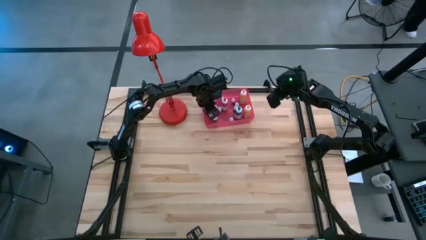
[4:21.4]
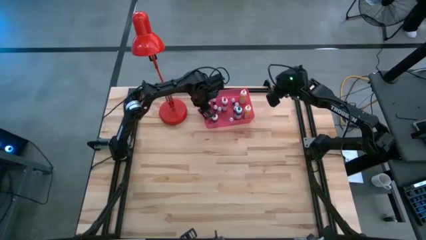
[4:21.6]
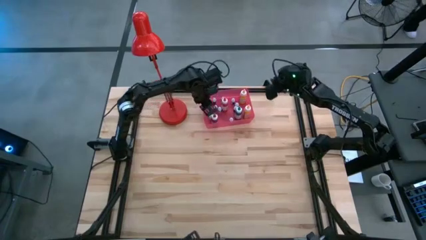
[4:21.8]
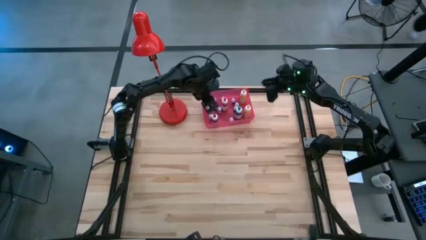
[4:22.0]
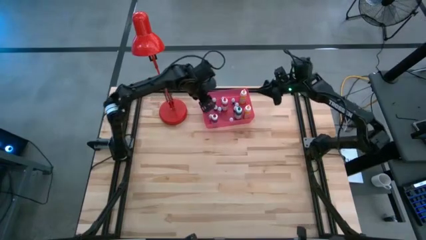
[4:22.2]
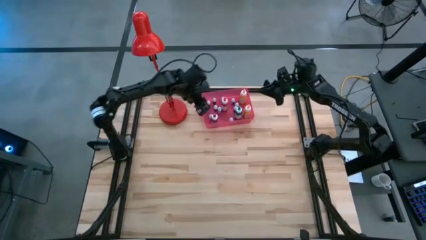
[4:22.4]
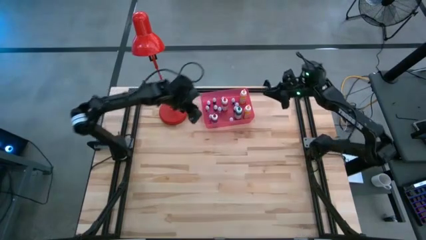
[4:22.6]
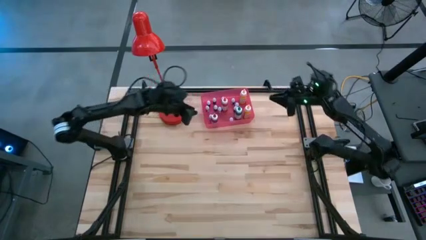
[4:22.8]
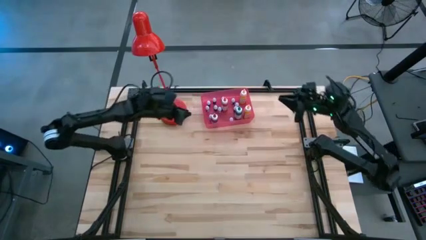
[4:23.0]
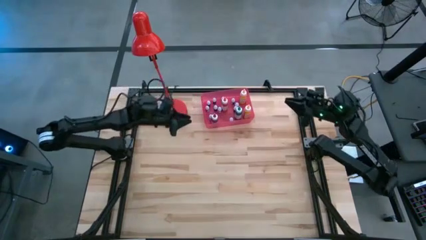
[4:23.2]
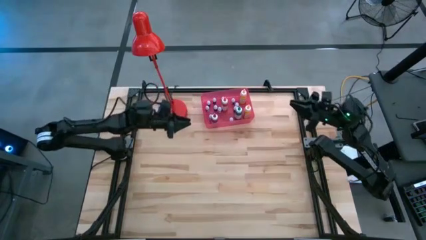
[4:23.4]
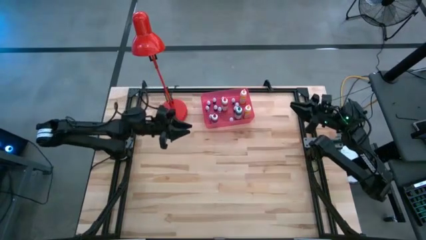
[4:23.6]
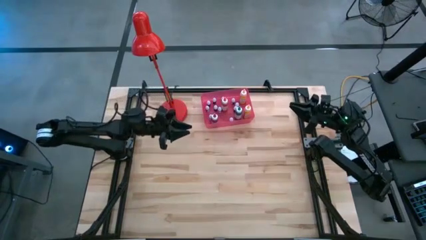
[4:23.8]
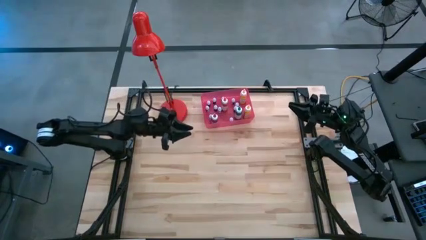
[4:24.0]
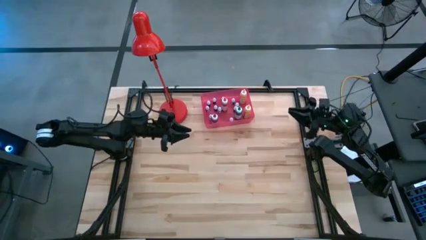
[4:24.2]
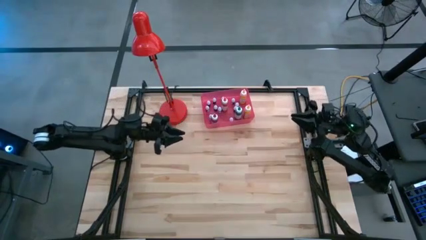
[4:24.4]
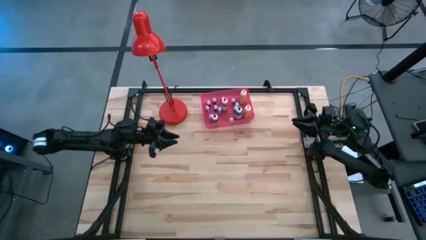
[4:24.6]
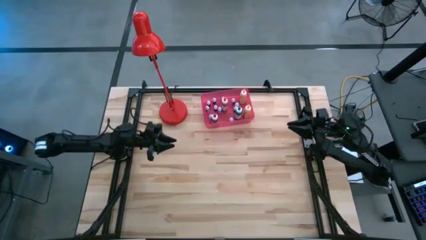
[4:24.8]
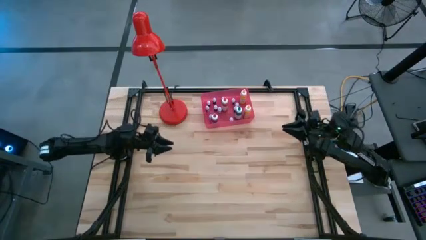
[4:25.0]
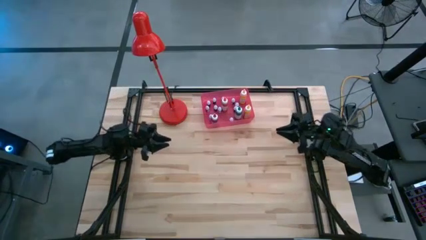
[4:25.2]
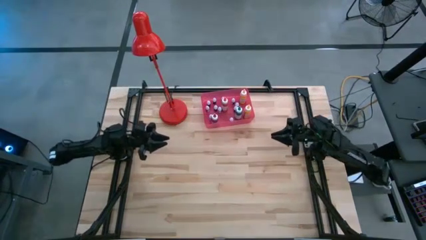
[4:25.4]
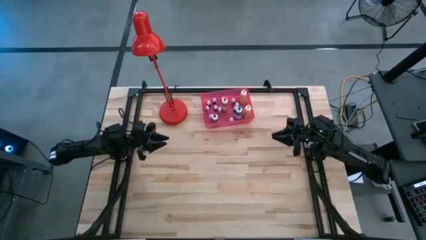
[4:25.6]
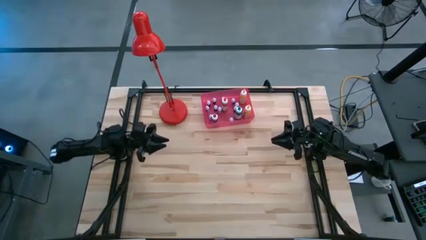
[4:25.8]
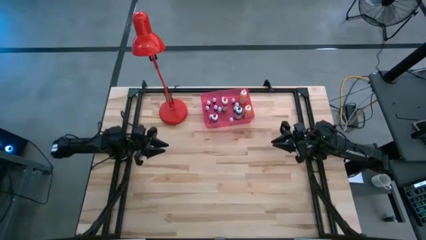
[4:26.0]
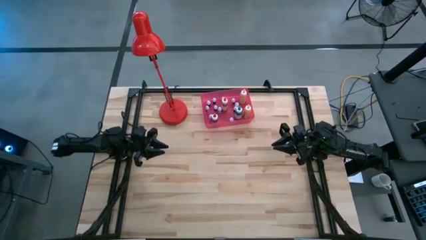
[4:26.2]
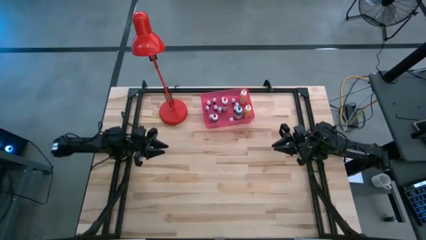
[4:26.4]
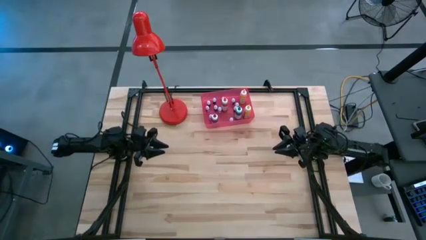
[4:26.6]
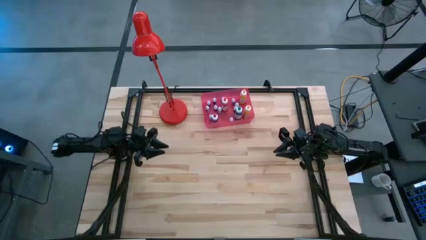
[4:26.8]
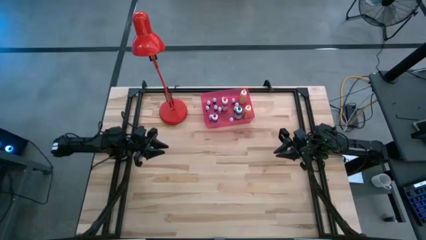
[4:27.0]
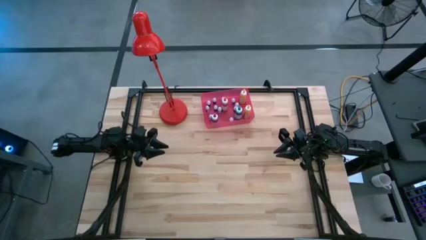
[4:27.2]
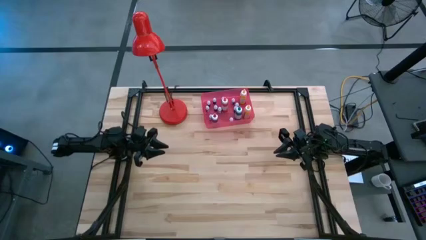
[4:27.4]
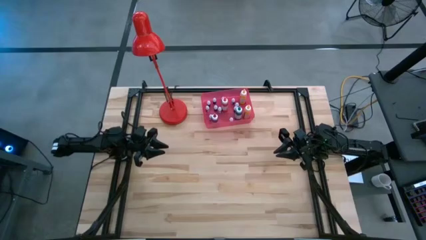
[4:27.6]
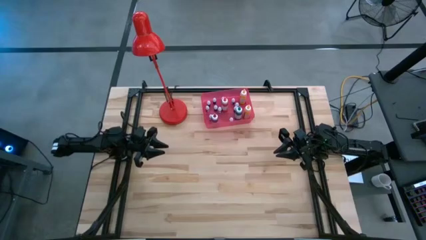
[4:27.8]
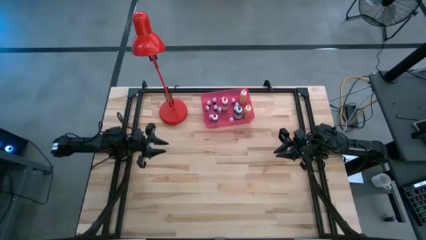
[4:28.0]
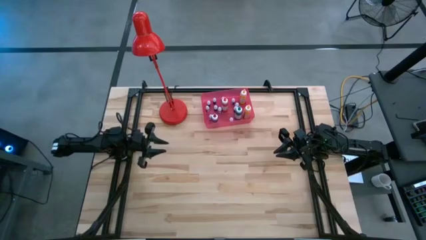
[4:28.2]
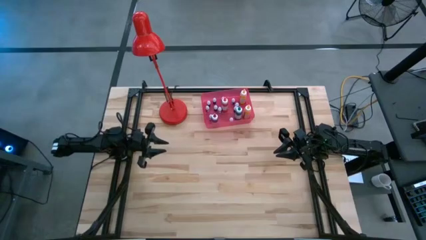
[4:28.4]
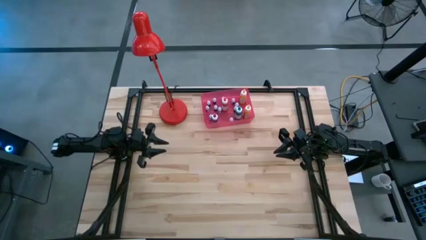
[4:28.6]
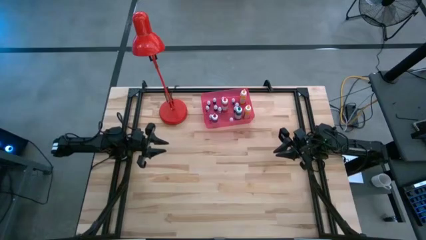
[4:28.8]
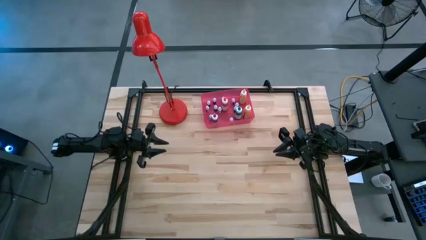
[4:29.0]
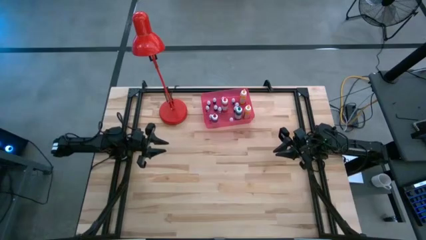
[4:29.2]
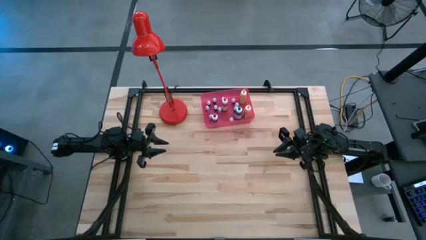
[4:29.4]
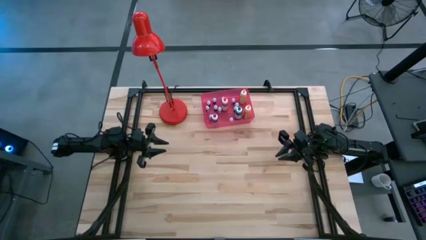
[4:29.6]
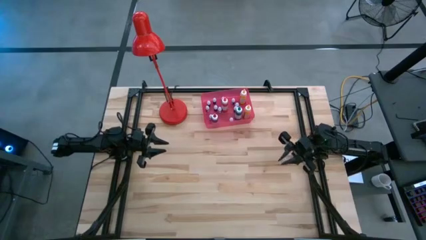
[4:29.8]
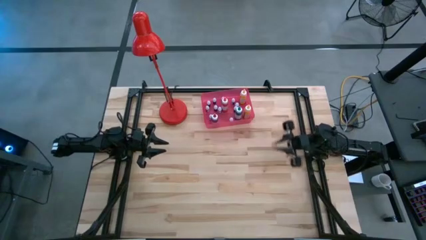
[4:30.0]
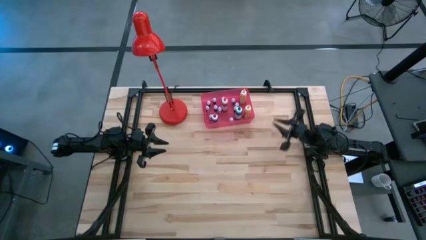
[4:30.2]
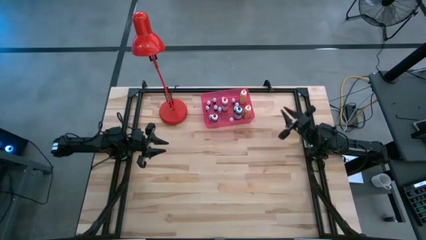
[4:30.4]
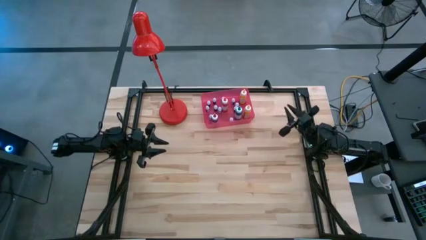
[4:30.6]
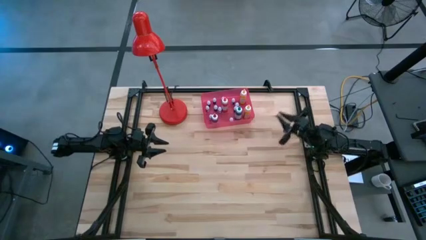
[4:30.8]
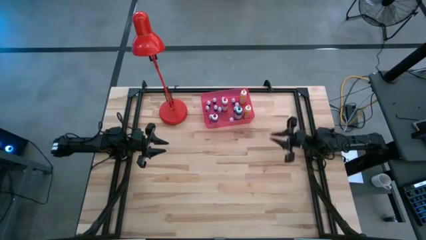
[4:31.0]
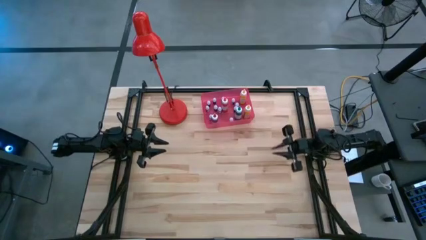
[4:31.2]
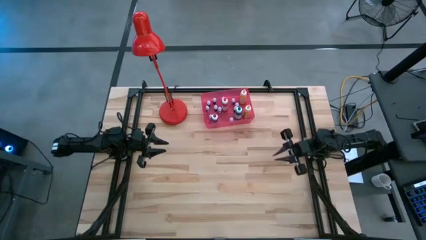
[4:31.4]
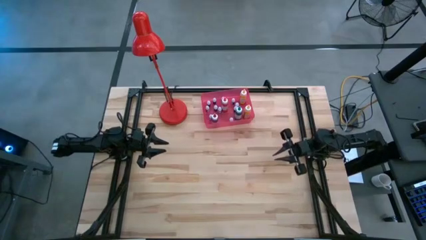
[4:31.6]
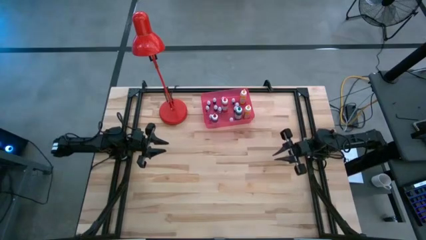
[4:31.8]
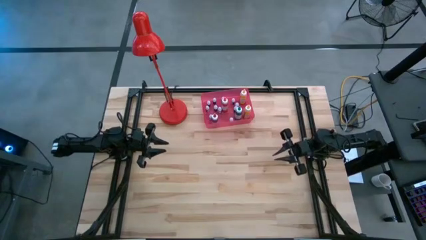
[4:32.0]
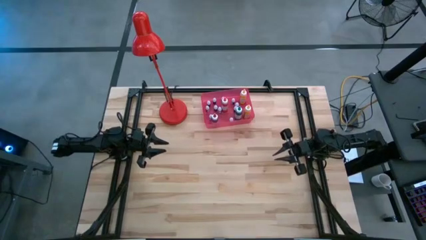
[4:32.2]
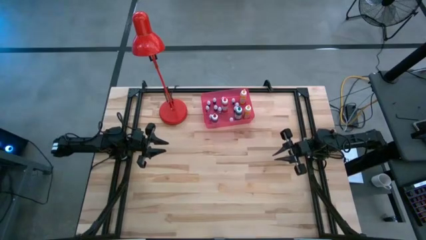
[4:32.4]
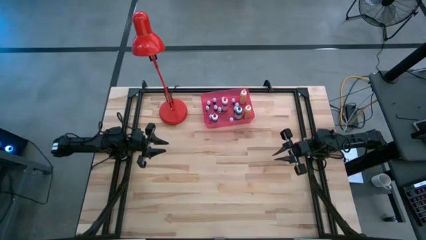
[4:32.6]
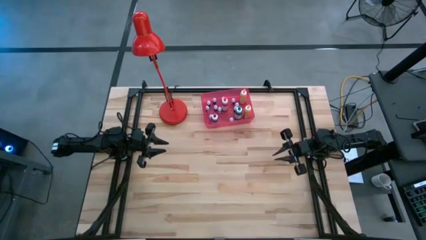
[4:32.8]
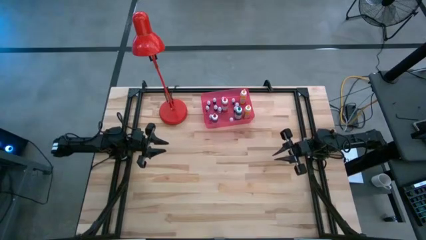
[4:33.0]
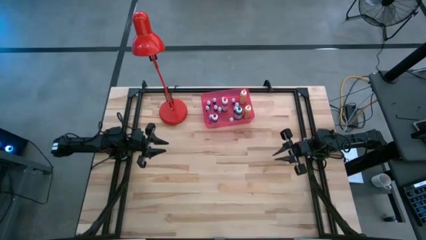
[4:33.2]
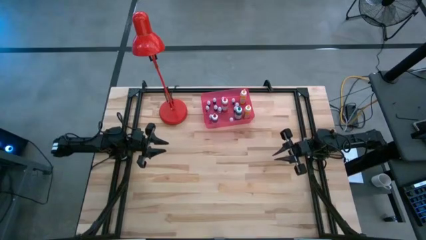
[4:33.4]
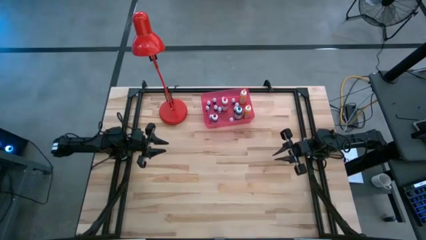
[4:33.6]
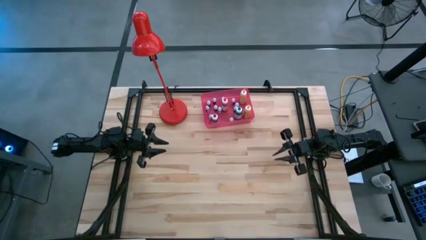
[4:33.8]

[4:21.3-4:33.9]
Task: Pick & Place food coloring
Return to Home Position

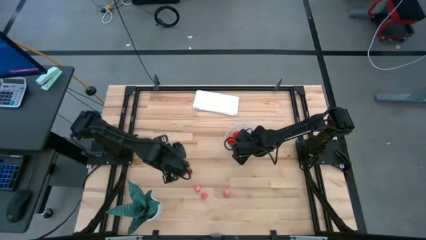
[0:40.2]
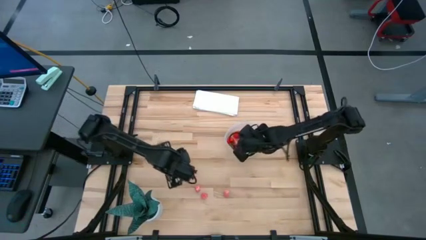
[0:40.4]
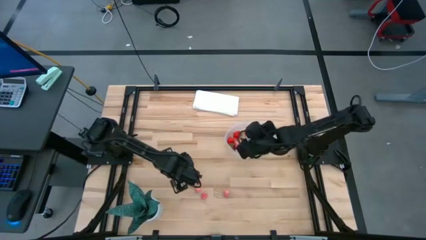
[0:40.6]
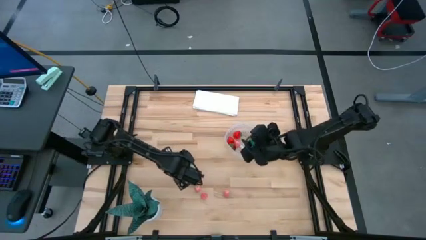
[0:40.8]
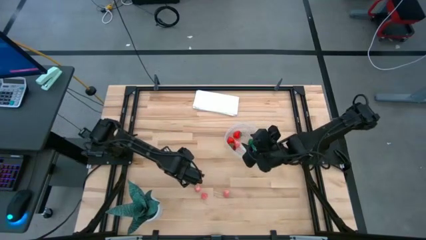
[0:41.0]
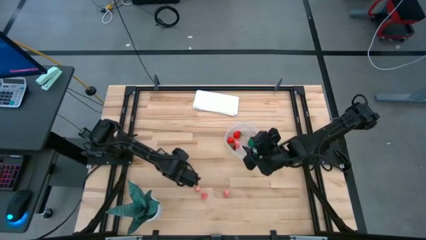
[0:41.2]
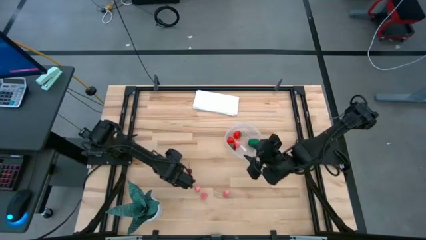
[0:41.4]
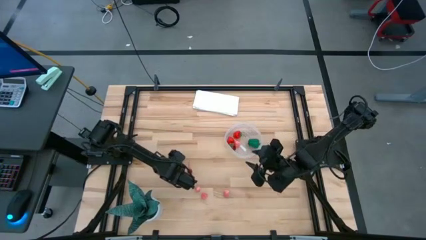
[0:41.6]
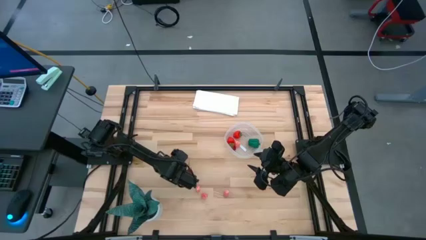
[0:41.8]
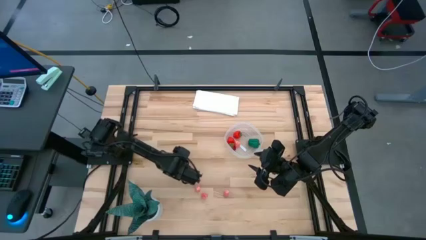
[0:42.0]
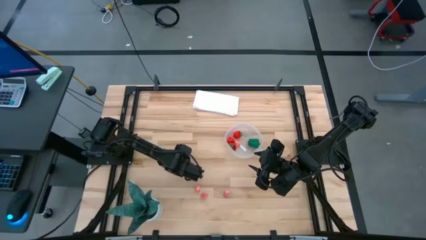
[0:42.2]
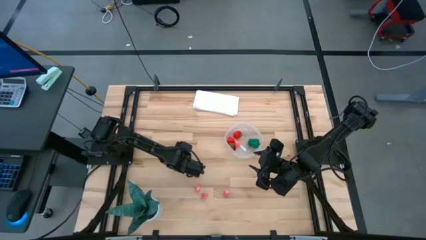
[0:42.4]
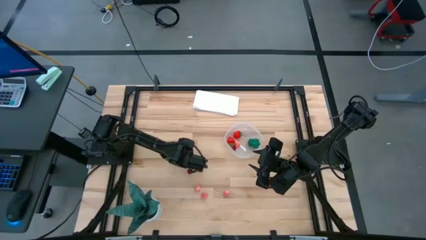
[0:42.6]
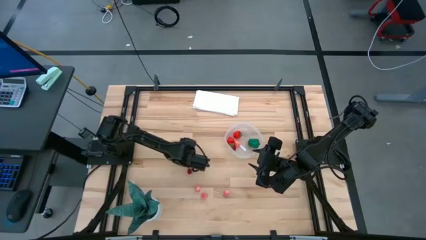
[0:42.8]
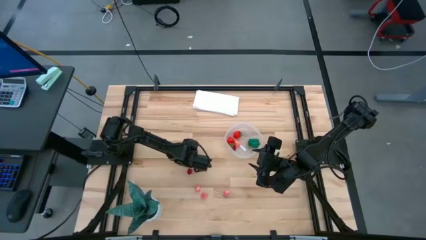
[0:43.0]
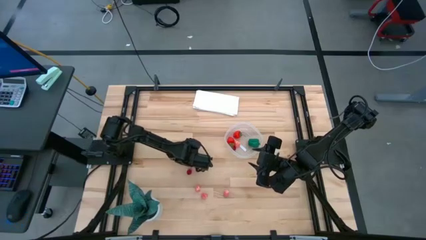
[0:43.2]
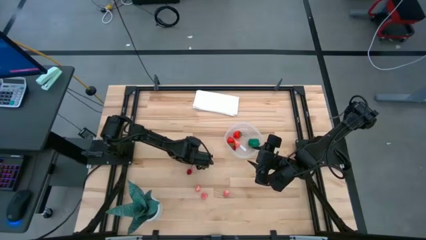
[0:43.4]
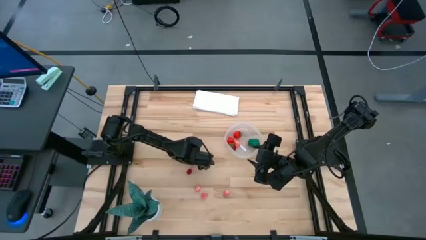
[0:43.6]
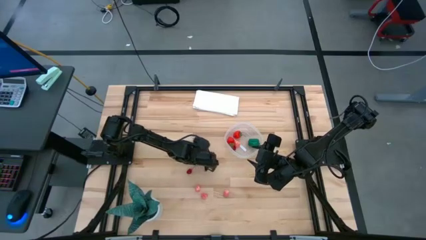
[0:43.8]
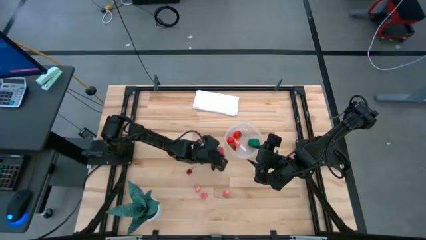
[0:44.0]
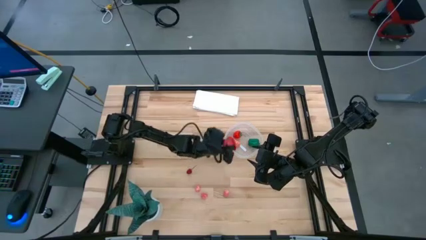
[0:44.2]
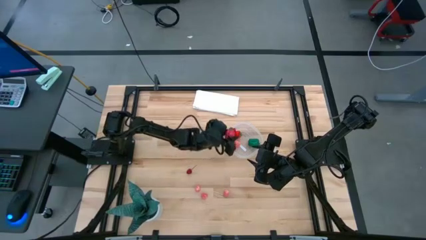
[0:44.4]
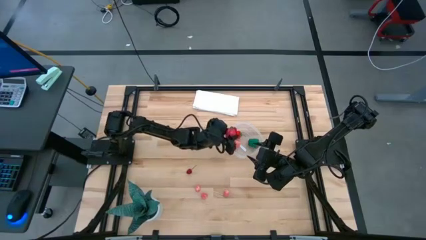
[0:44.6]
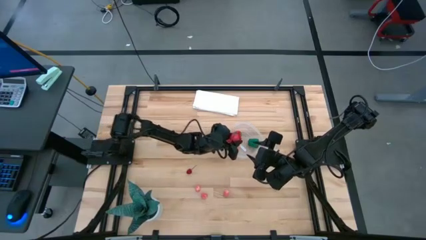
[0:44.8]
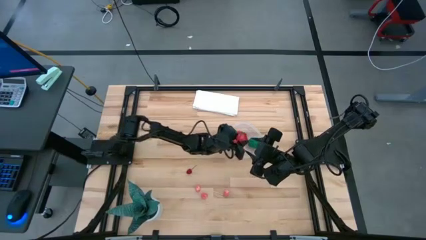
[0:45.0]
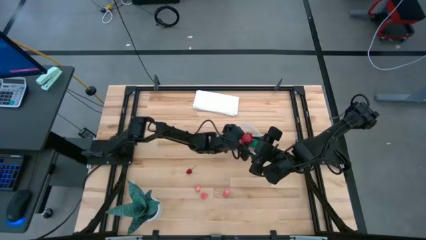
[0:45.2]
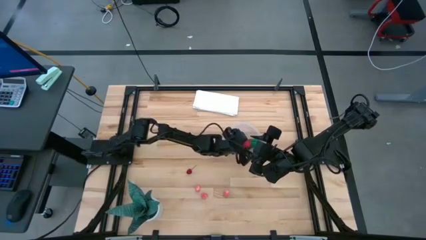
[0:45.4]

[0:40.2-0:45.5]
Task: Pick and placing Produce into tupperware
Put the pink dragonfruit into the transparent bin
